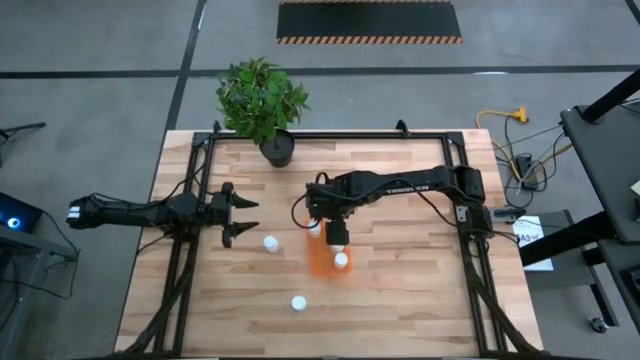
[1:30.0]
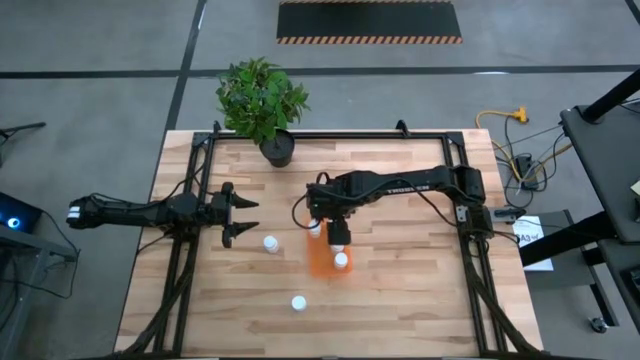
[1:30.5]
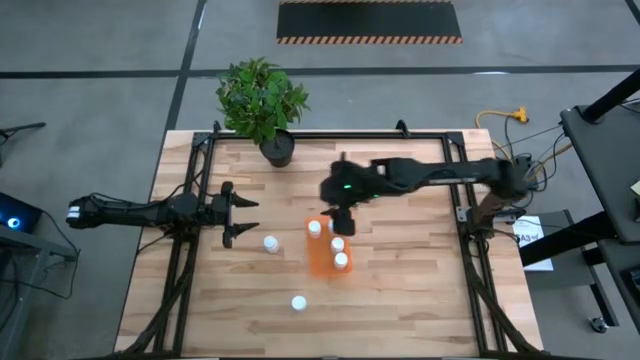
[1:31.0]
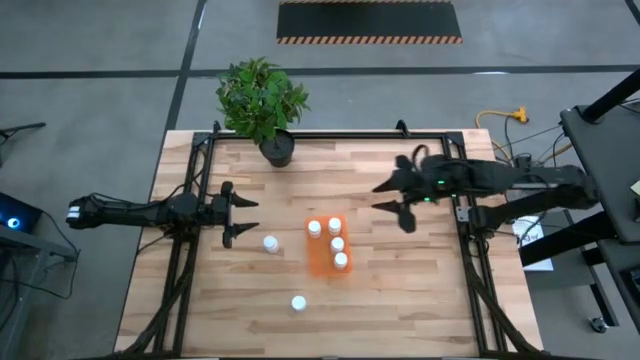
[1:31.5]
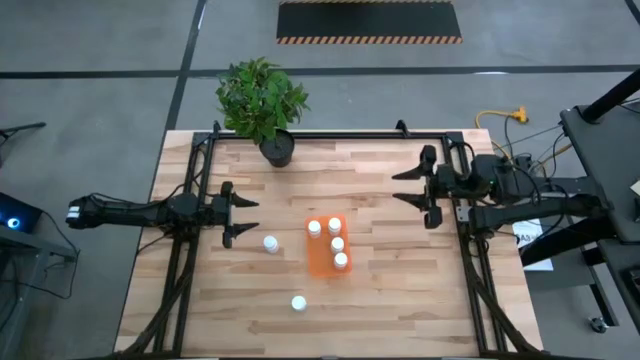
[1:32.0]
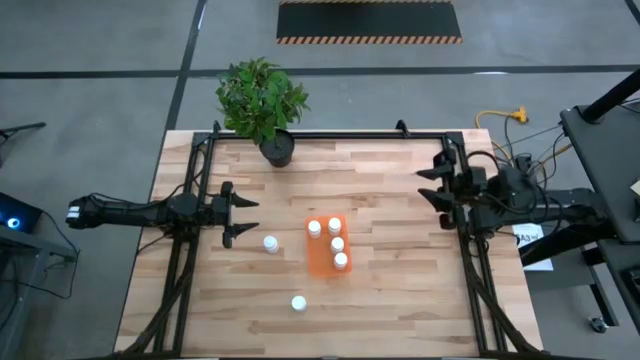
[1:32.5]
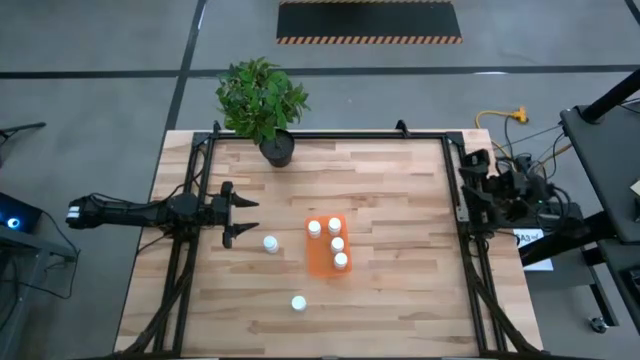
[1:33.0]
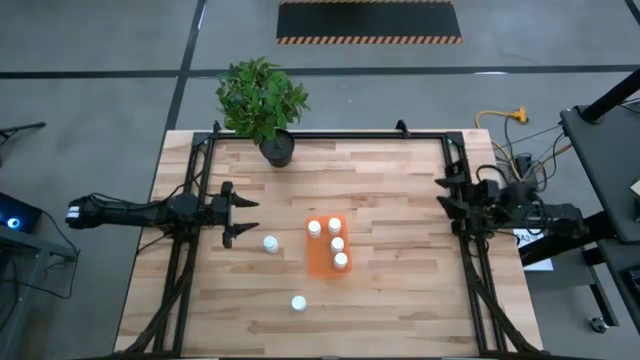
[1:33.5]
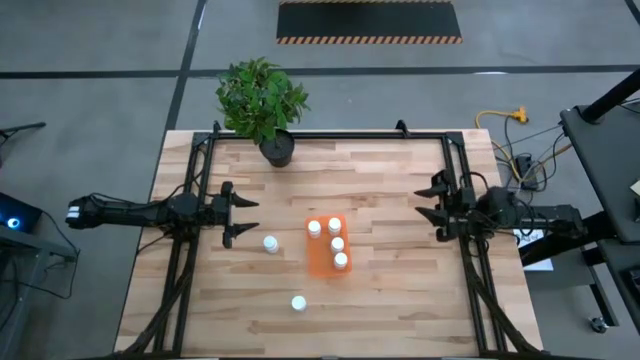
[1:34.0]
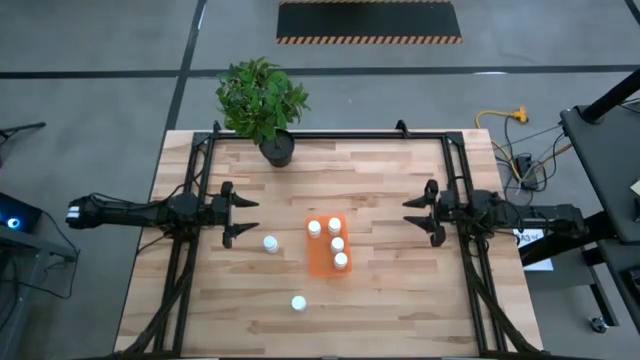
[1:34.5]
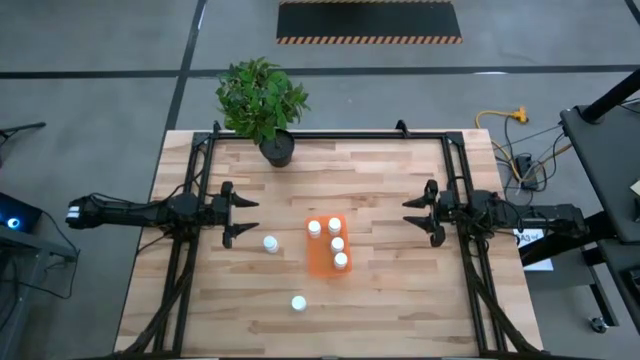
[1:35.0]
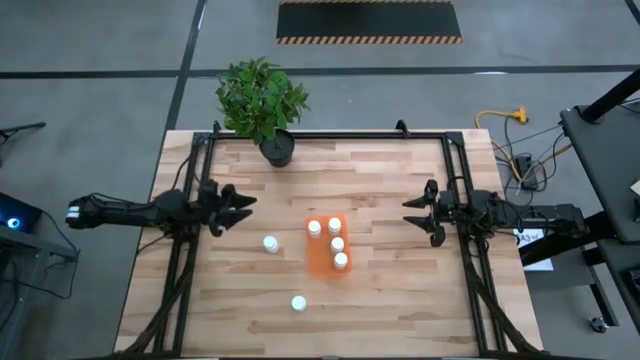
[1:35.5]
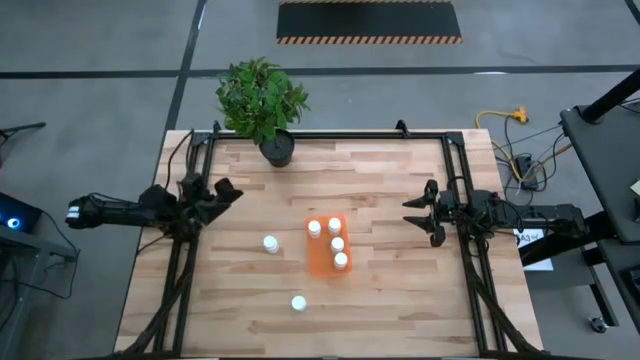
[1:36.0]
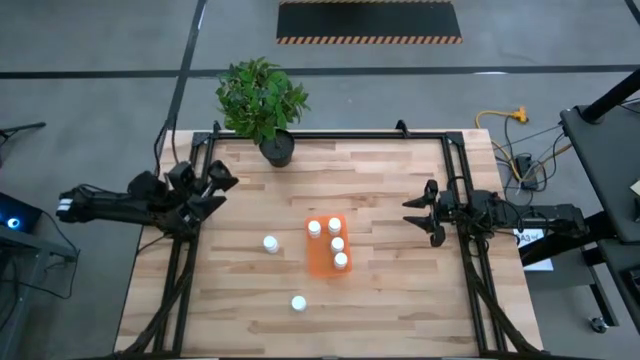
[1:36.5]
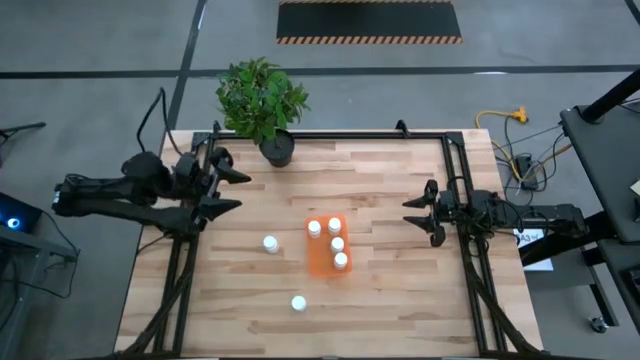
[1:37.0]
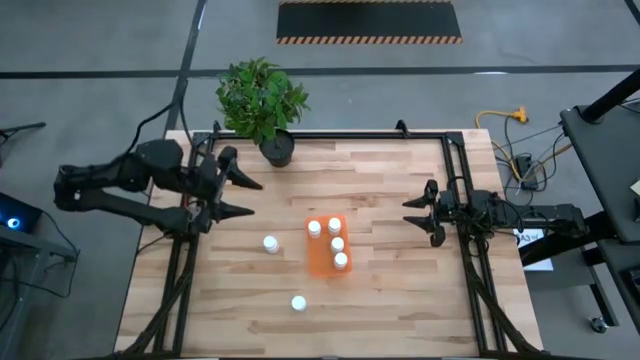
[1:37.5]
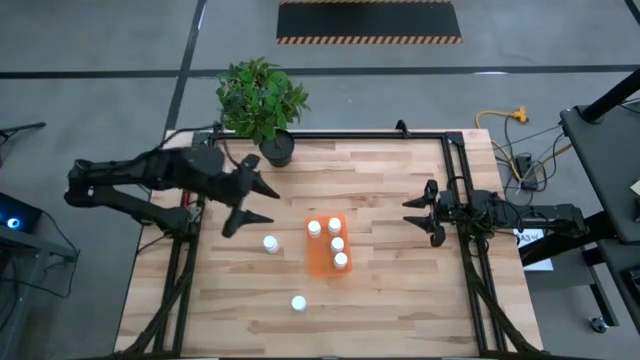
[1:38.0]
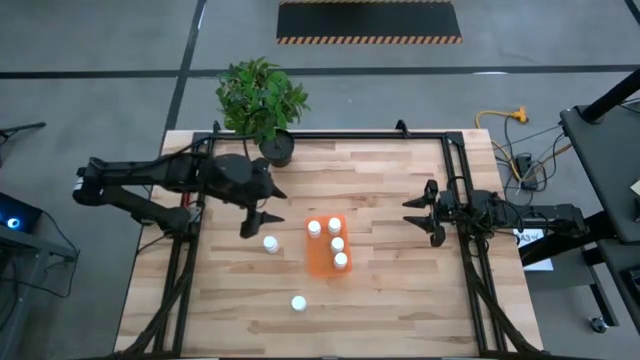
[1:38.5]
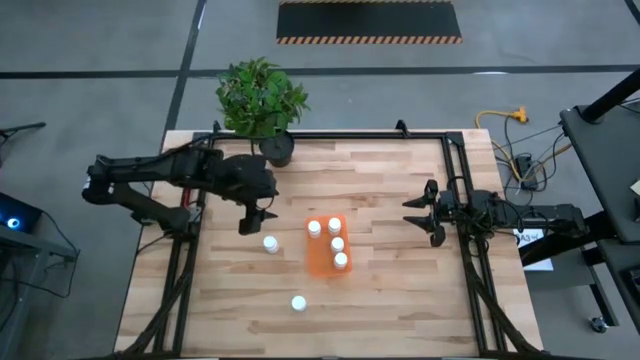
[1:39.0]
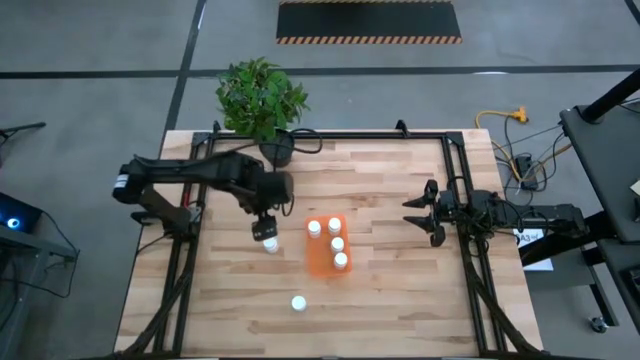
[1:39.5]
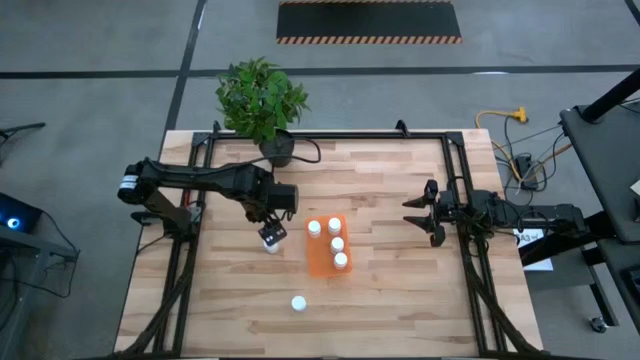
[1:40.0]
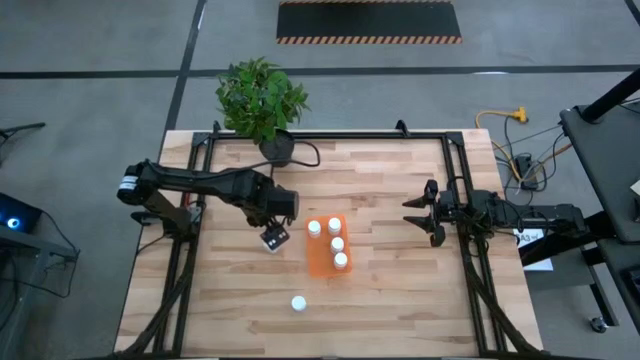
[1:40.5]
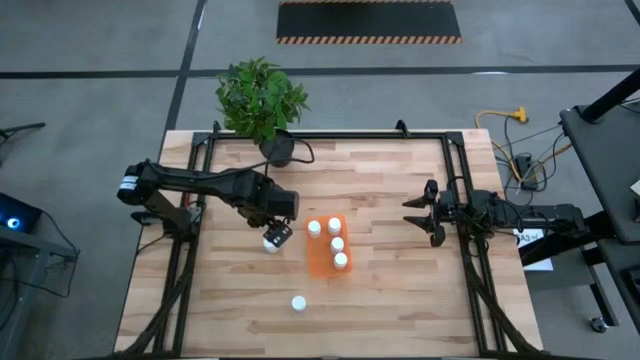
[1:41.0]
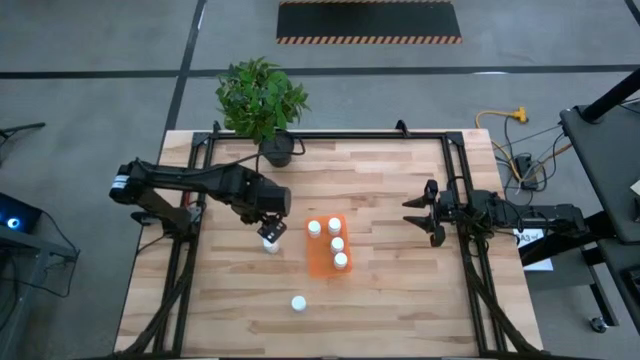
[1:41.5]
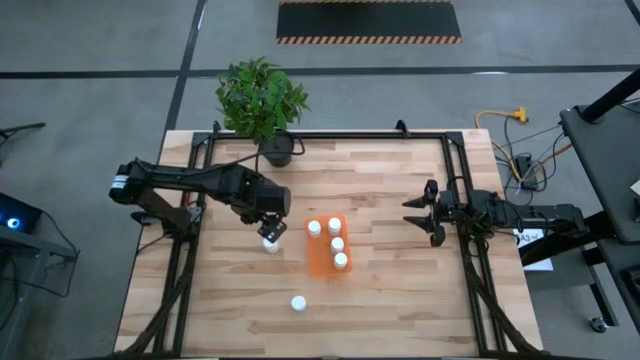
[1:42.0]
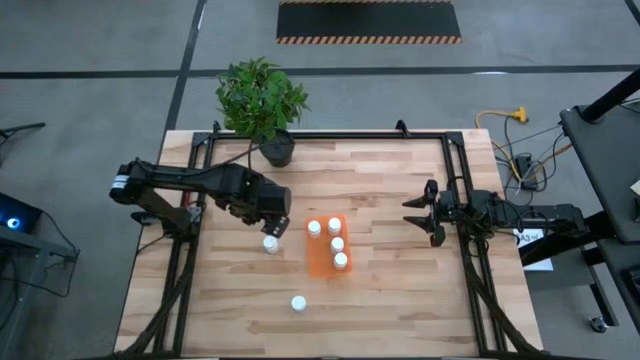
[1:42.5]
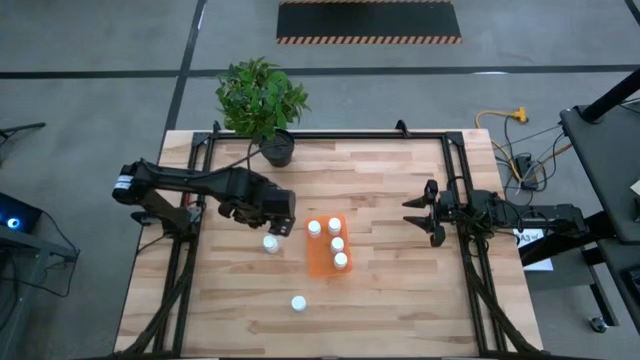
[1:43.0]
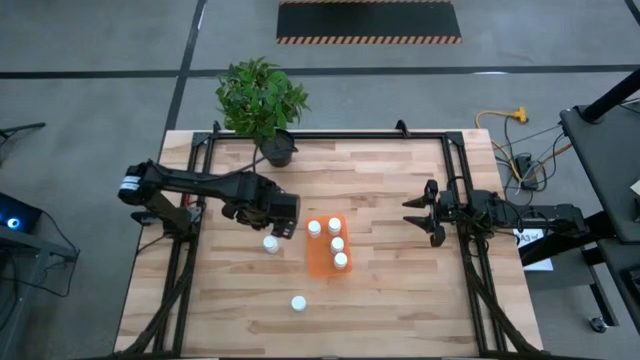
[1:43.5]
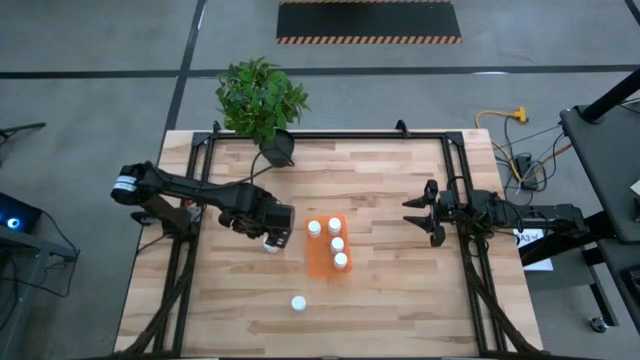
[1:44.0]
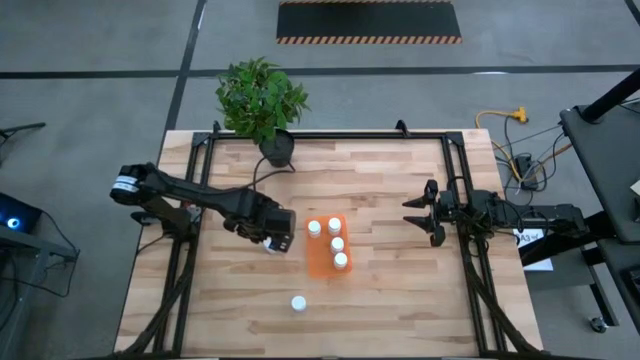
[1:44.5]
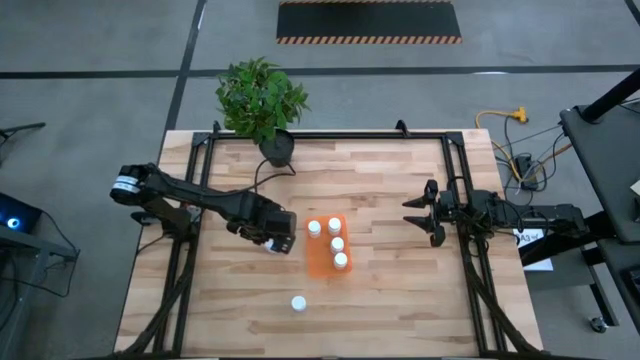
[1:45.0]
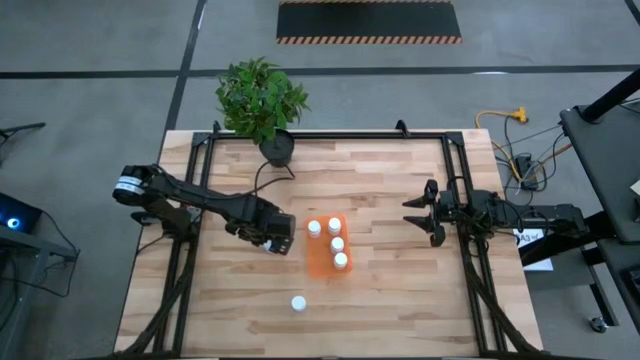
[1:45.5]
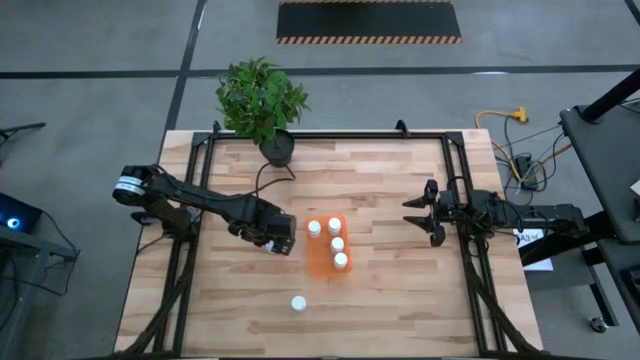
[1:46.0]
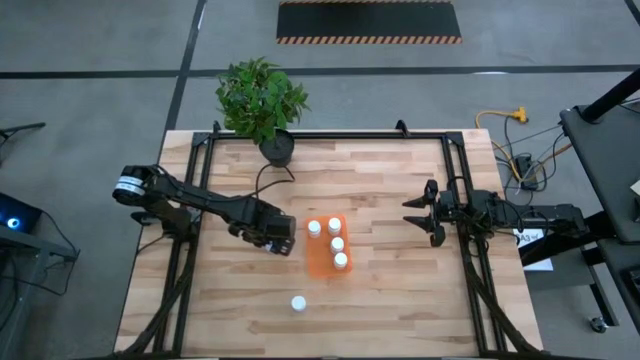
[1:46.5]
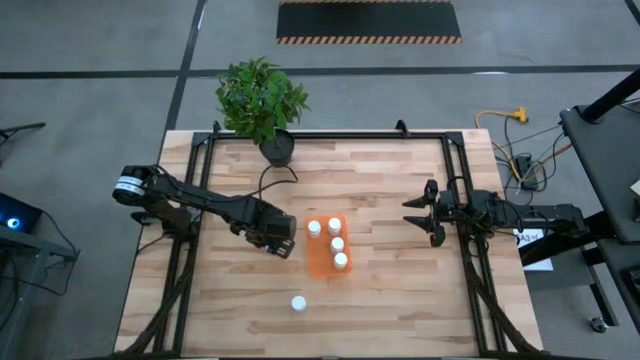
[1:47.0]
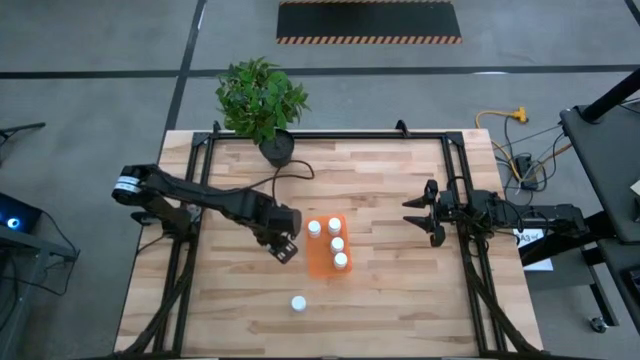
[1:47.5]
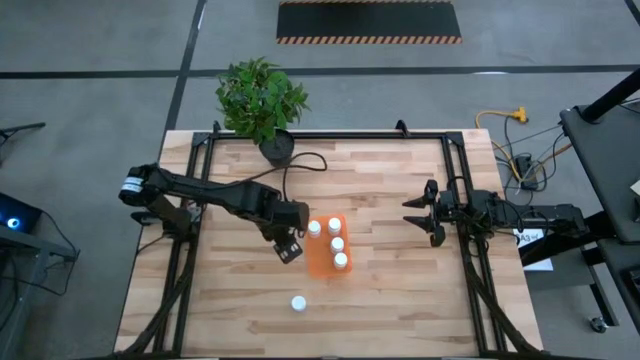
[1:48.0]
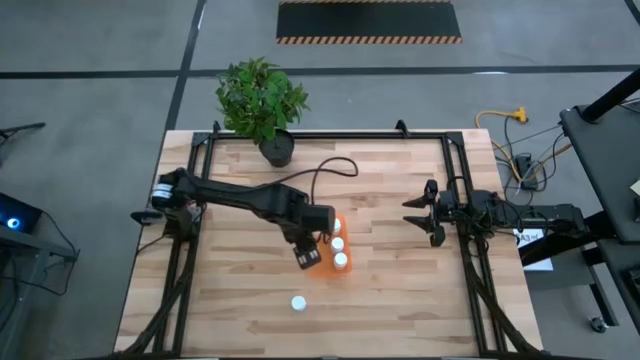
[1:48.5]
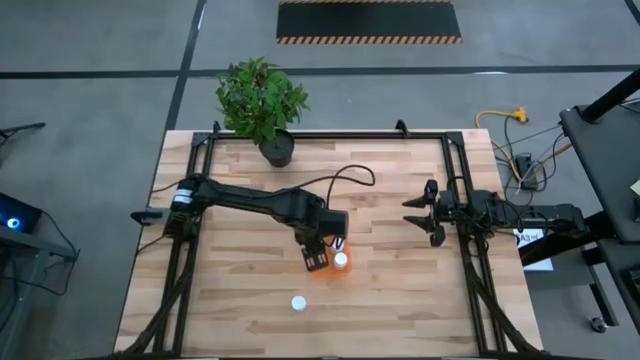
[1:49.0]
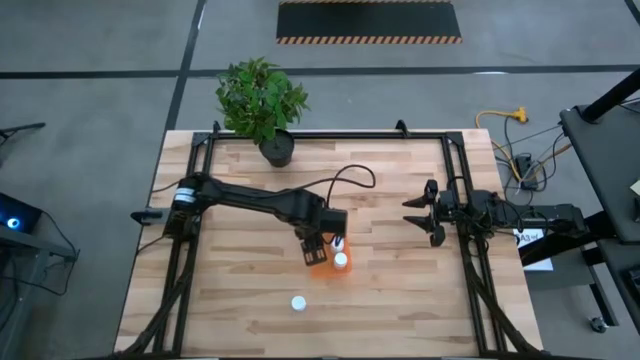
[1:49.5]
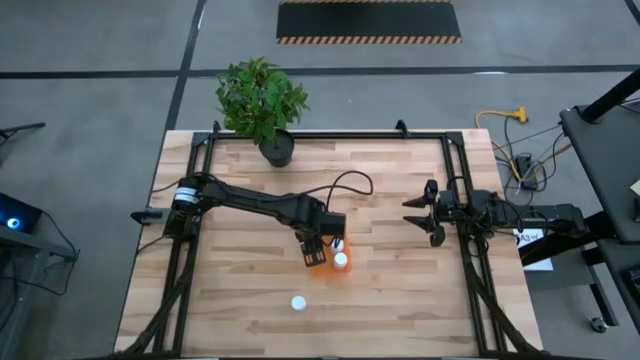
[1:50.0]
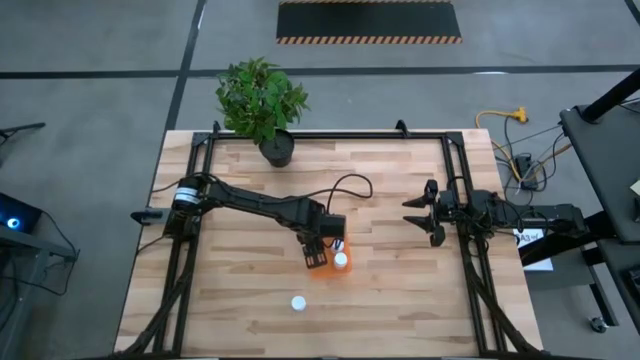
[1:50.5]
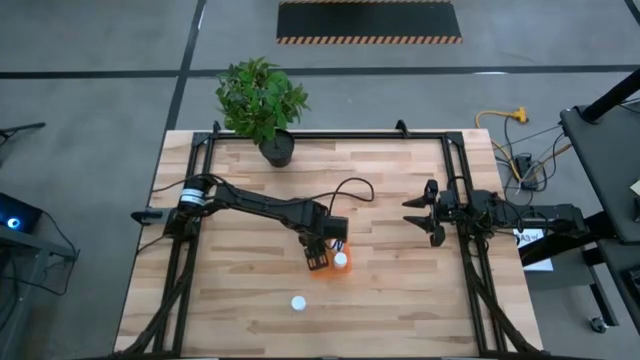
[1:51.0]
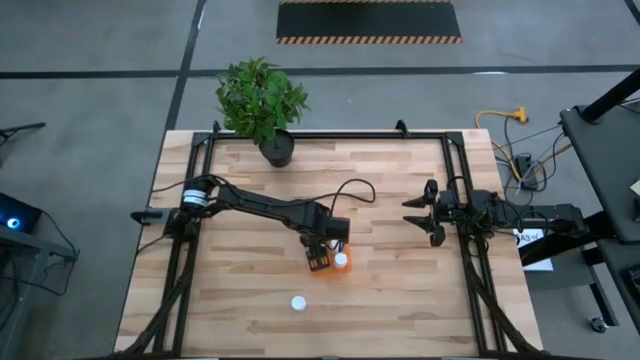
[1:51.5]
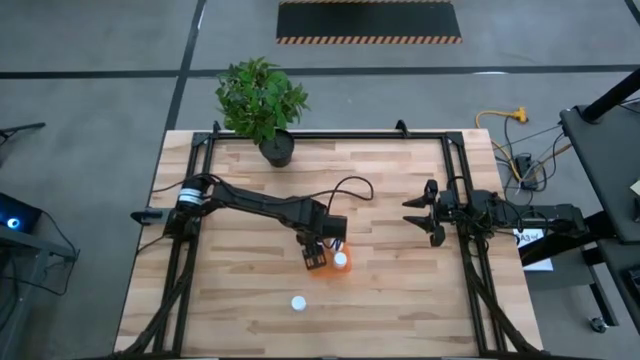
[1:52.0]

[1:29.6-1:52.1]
Task: Pick and place pill bottles into a basket
Put the white pill bottle into the orange container
